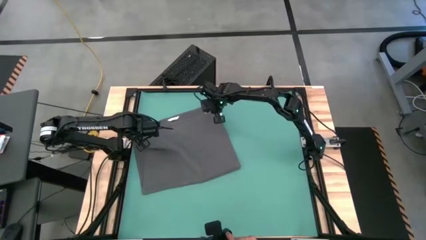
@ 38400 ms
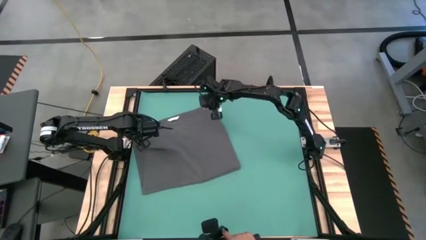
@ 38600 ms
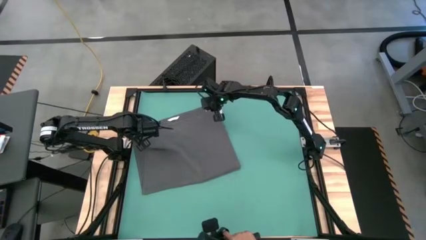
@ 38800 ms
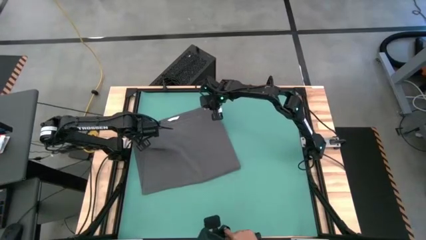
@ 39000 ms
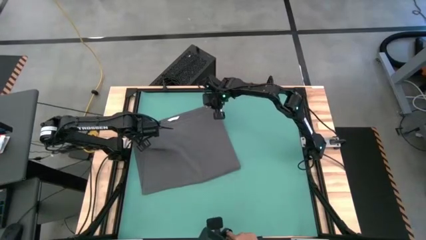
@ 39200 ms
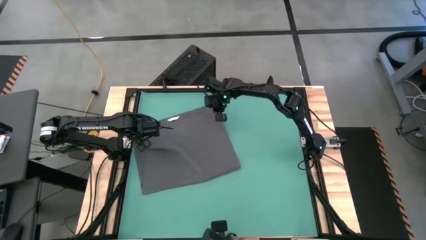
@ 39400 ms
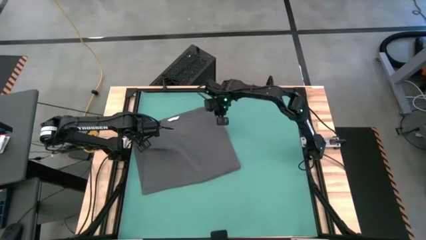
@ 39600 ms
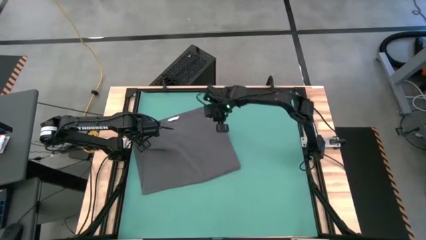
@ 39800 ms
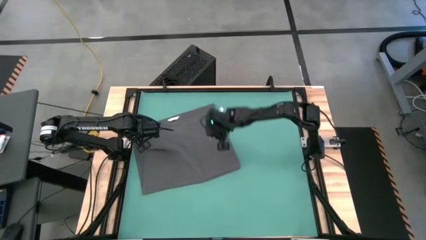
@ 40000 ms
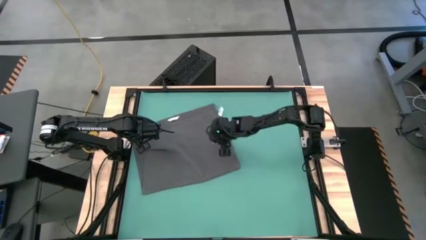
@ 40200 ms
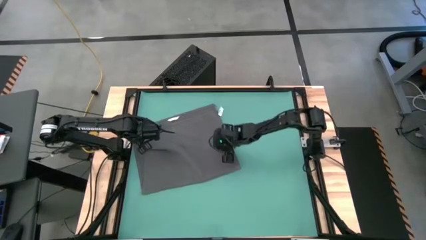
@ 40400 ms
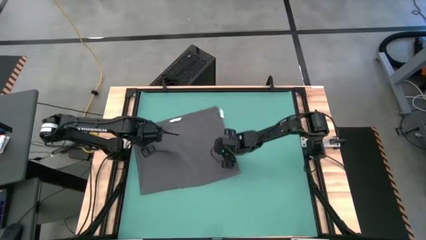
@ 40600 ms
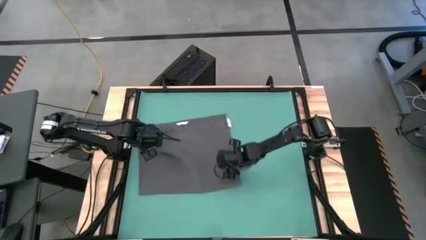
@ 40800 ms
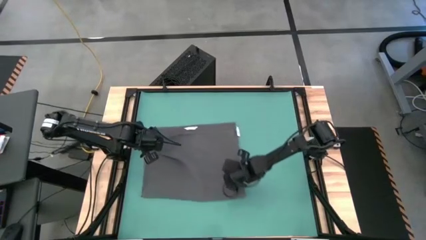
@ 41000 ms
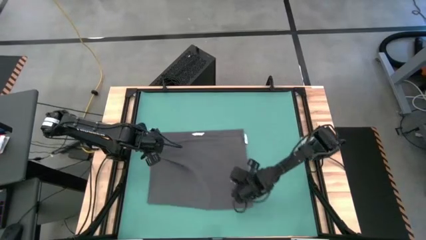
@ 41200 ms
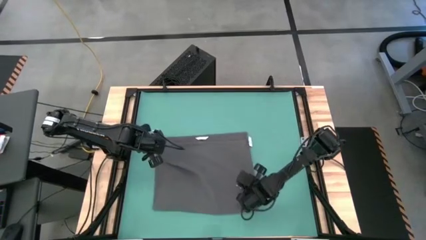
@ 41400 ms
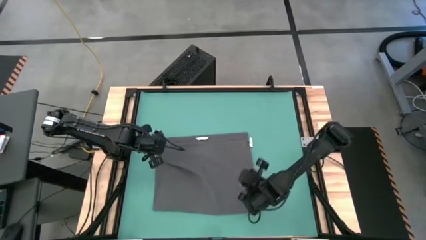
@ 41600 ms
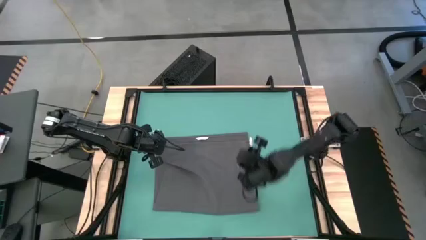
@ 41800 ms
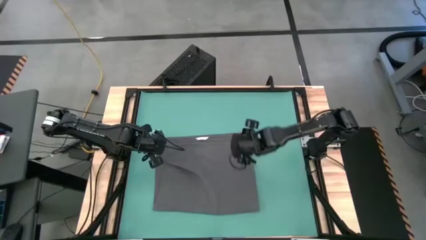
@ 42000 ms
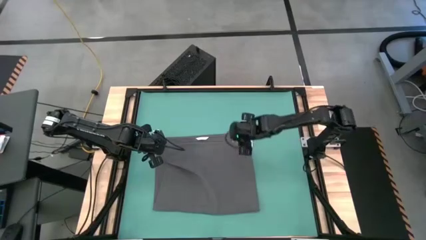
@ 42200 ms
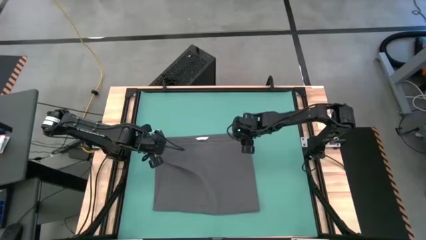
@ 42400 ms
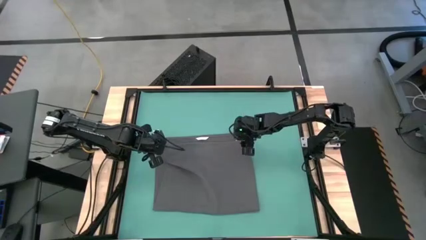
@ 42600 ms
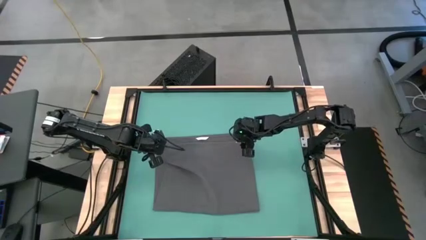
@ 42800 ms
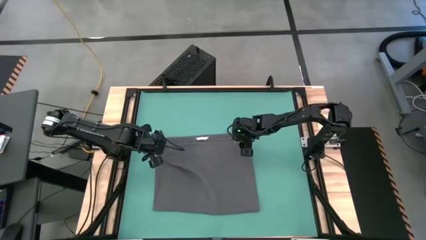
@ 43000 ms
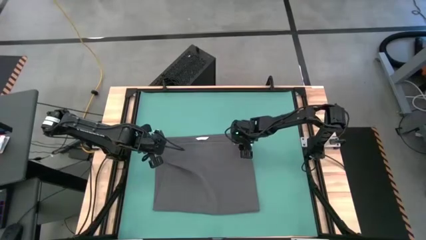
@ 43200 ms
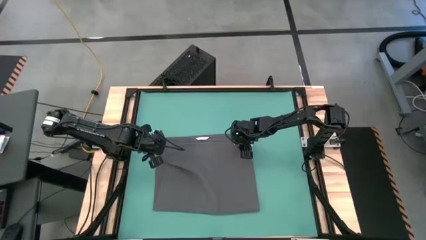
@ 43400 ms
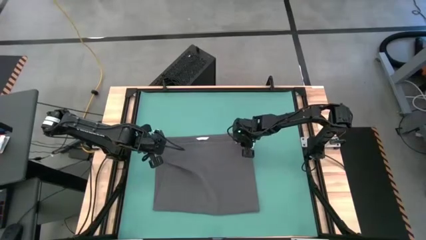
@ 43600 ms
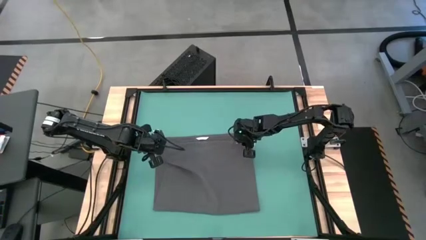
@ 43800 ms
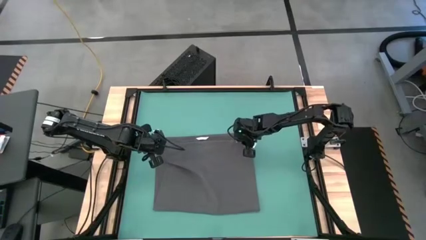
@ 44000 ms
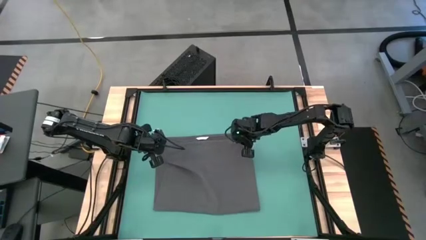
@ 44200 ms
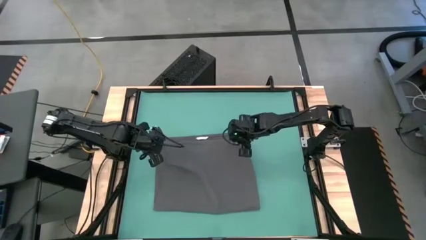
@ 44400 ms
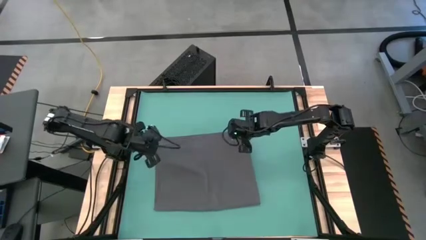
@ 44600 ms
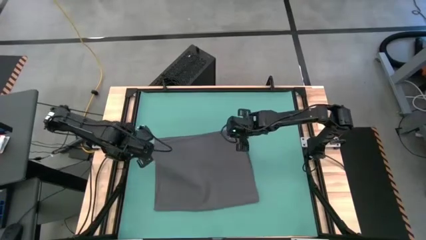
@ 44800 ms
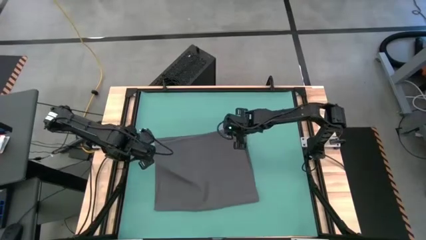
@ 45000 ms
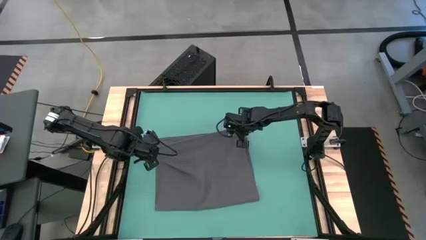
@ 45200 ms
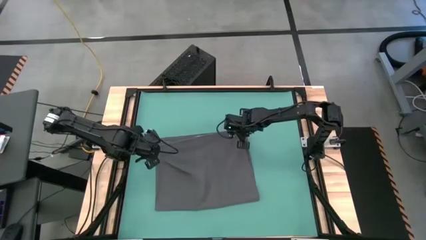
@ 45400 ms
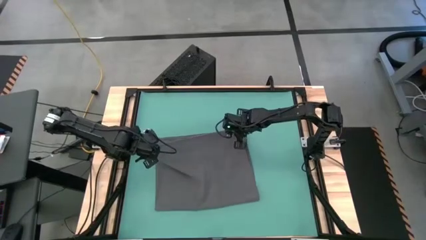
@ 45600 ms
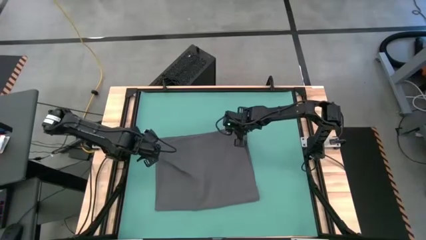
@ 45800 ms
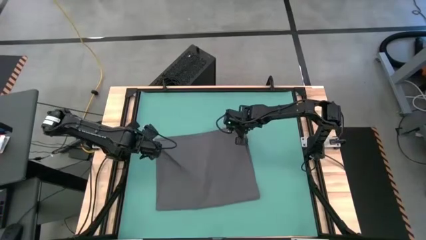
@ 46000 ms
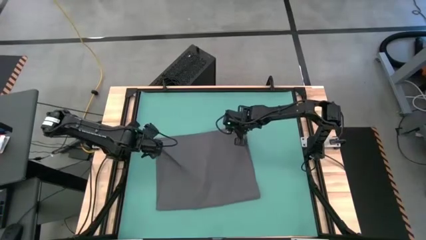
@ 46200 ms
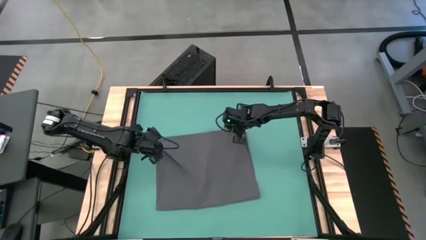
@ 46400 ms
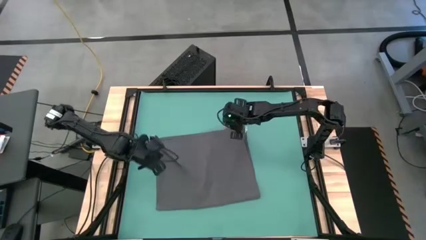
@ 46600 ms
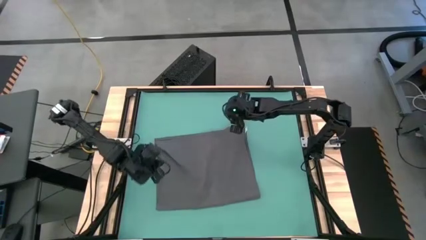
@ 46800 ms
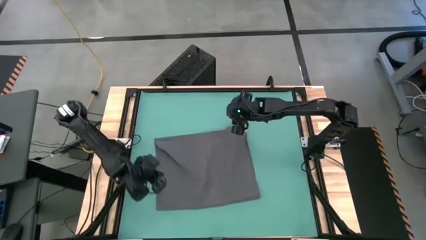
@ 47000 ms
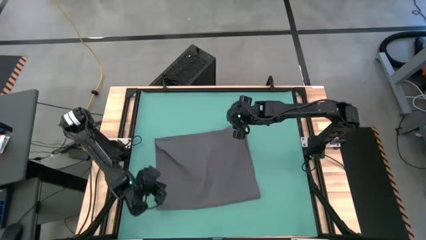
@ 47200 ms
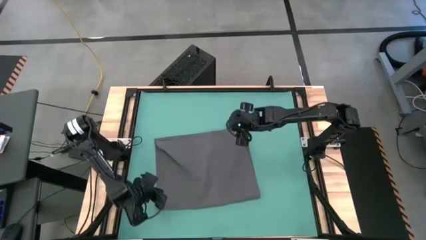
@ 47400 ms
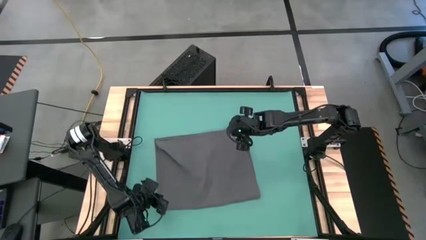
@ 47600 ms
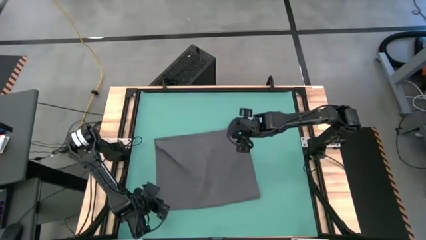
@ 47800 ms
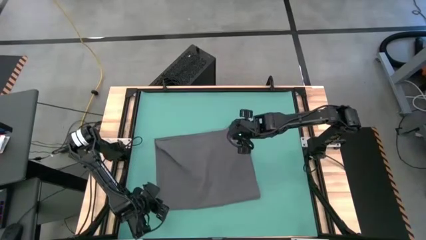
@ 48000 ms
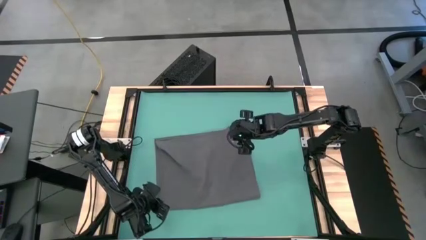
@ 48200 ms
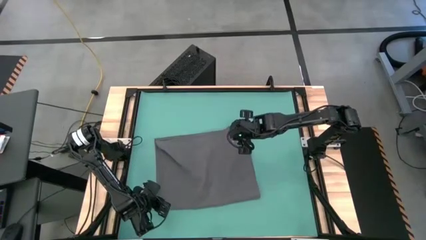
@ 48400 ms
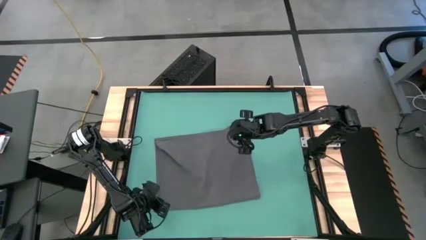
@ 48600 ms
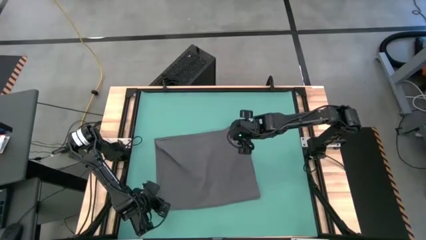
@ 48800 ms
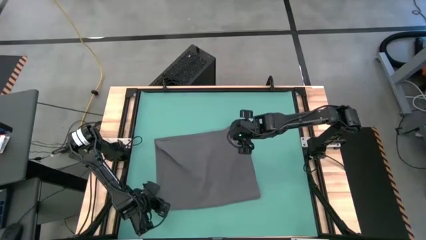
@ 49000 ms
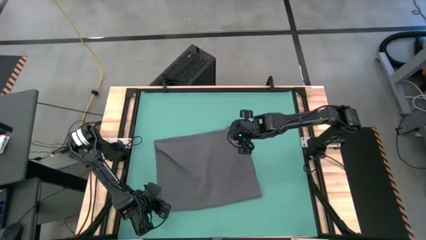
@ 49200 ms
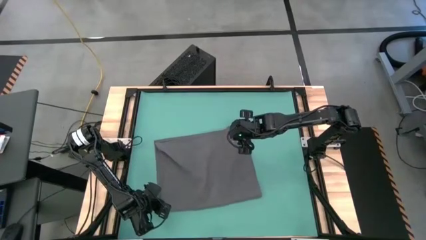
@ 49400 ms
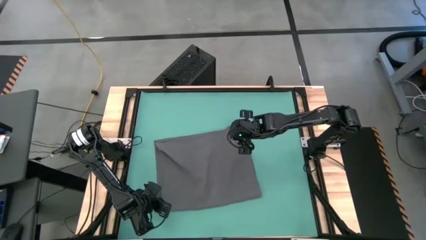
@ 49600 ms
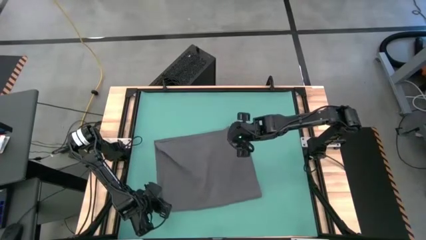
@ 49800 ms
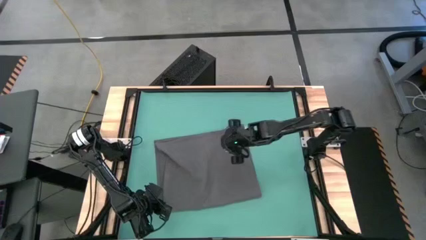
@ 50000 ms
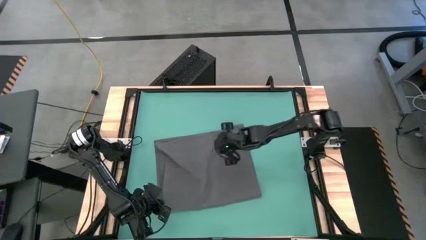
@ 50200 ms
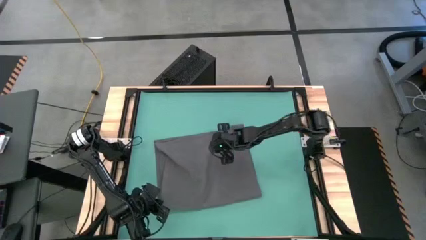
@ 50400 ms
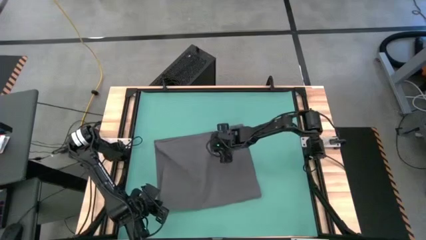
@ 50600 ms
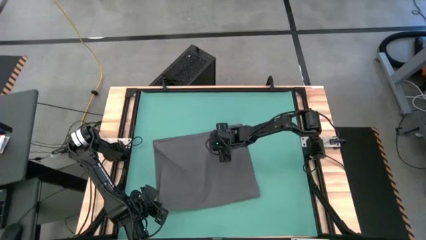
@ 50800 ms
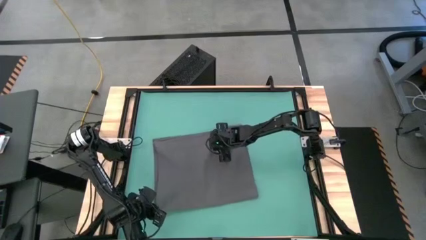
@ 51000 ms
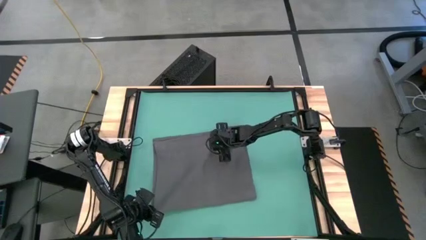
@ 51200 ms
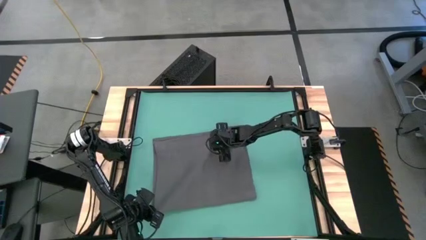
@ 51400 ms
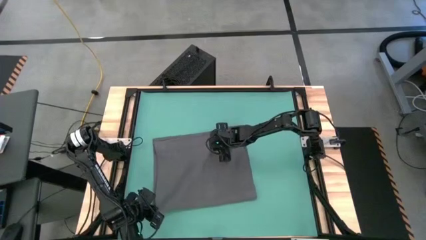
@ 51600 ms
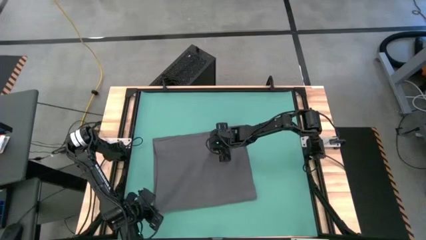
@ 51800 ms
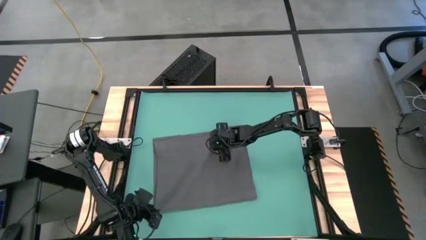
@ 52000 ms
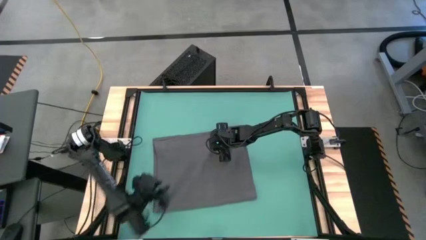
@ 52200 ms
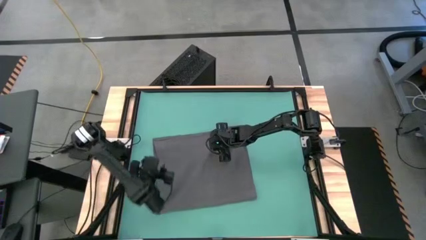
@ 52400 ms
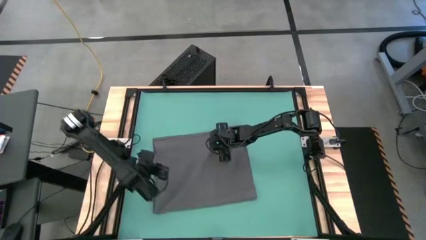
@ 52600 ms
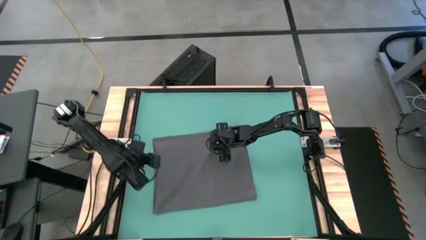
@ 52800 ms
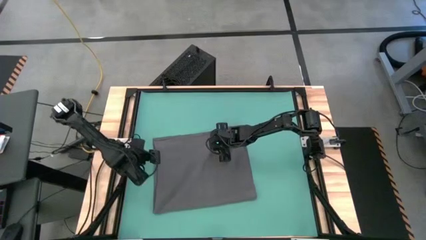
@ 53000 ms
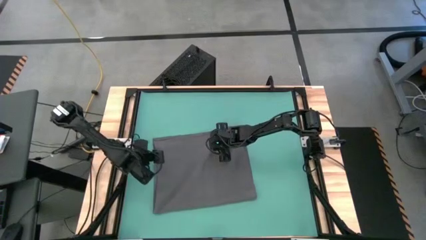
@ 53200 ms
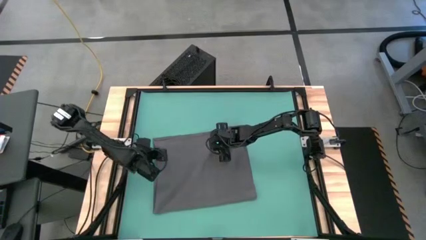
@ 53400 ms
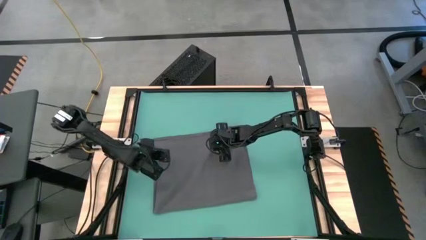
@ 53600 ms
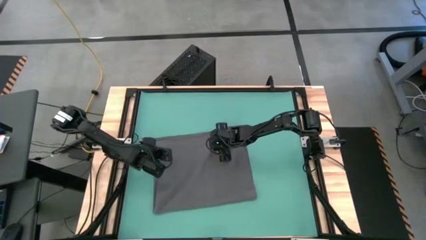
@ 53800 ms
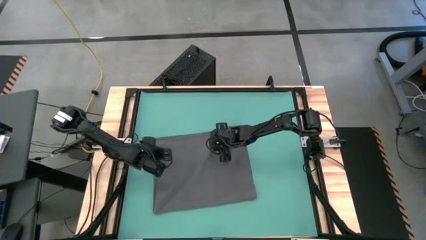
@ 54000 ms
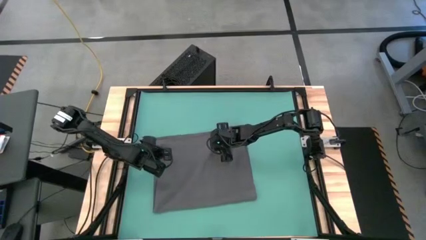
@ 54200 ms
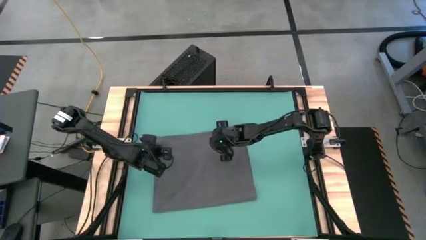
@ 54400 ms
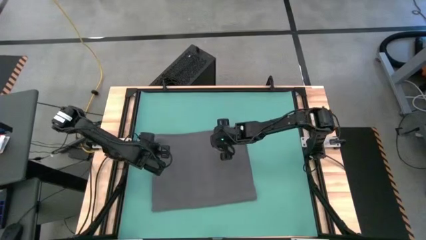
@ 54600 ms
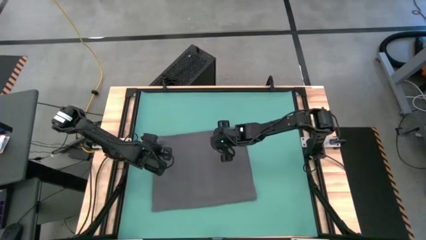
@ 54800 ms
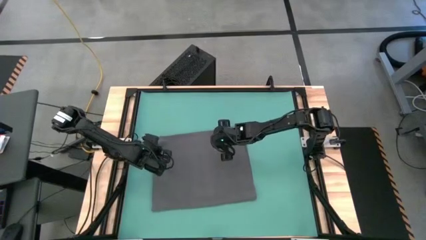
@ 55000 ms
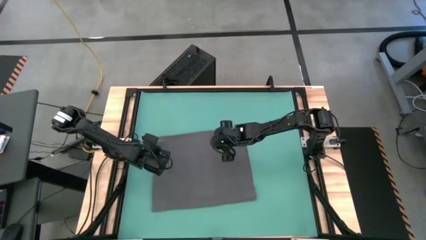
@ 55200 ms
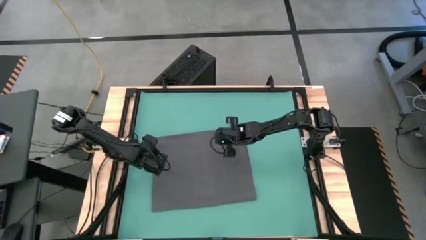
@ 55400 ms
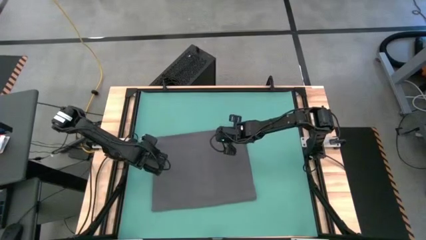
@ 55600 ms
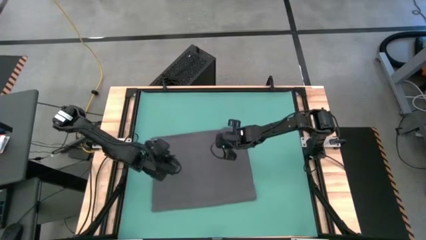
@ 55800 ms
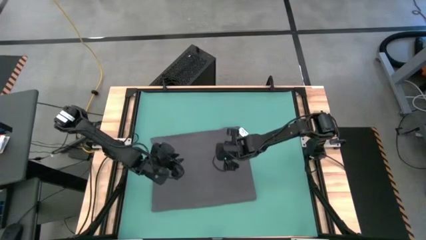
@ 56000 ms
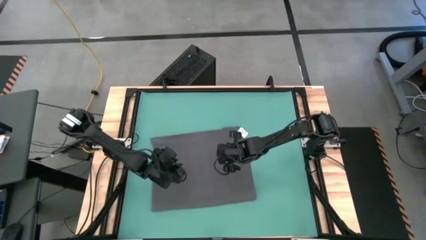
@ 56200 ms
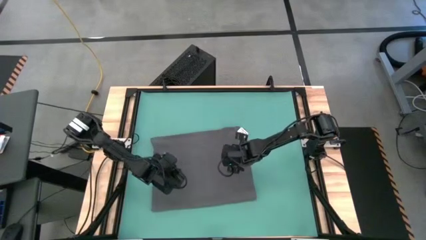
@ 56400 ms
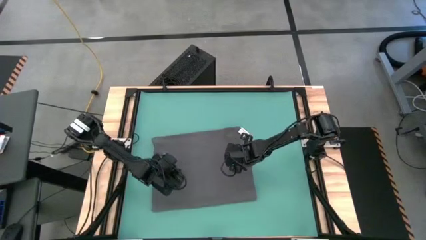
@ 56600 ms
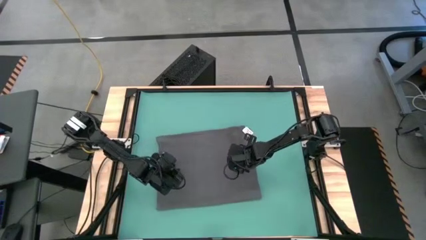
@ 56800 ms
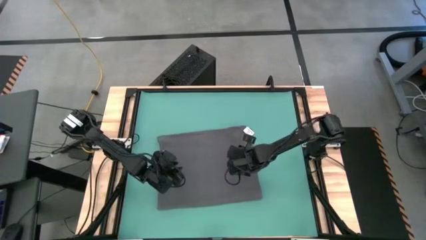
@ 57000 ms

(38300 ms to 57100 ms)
Task: Roll towel
Roll the gray towel
